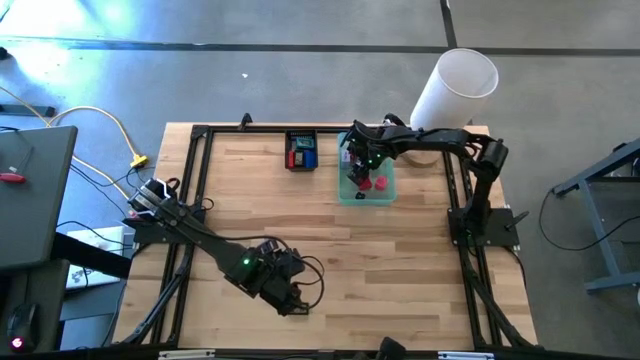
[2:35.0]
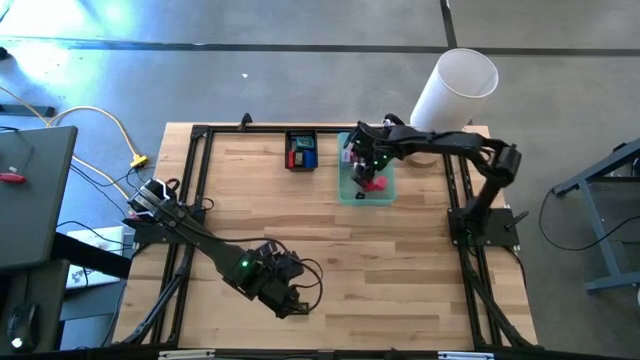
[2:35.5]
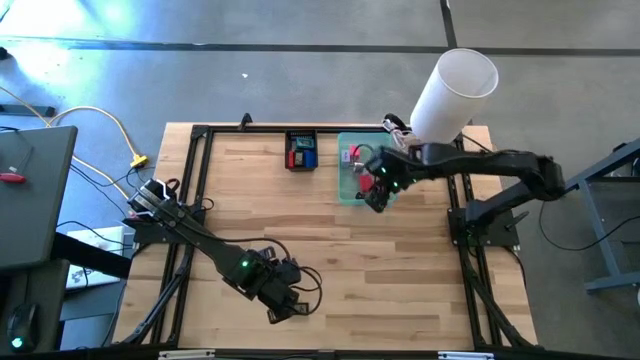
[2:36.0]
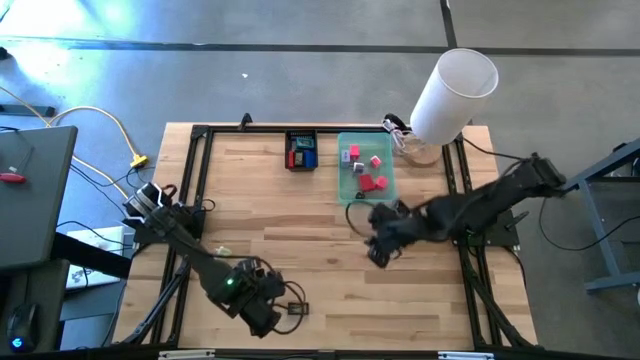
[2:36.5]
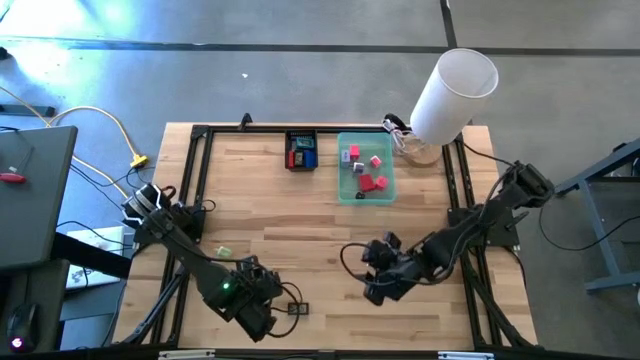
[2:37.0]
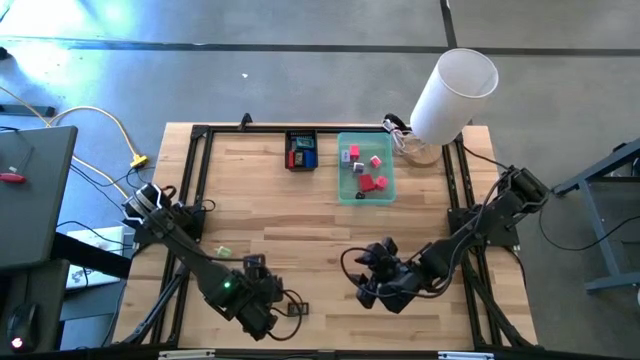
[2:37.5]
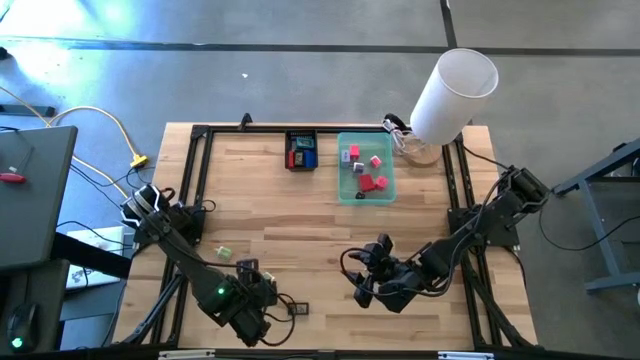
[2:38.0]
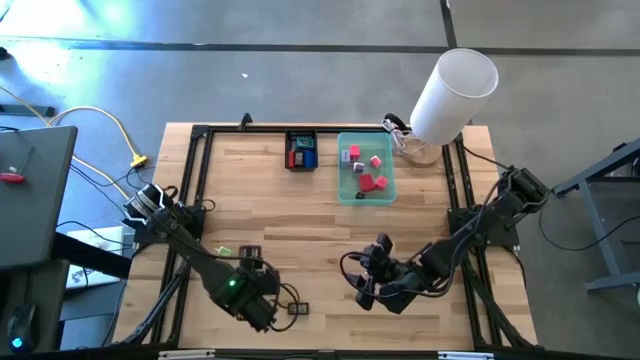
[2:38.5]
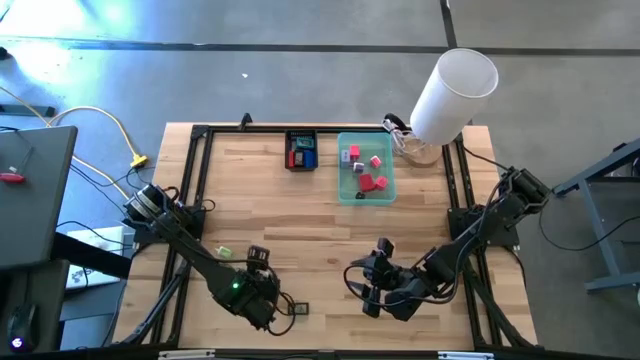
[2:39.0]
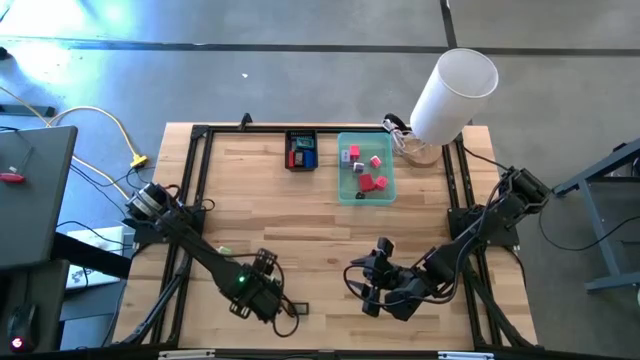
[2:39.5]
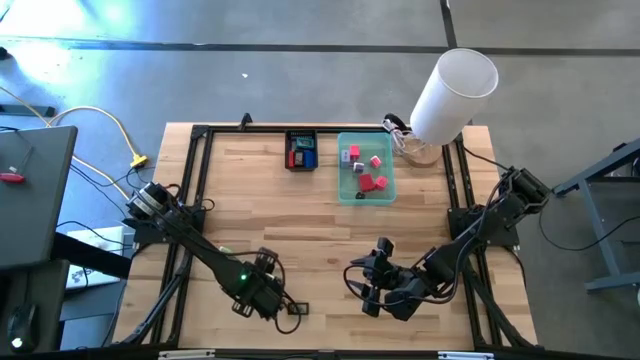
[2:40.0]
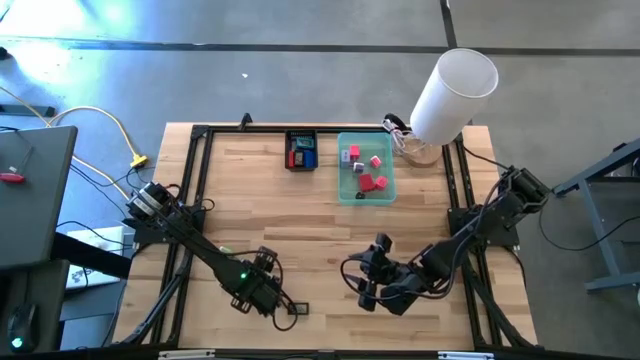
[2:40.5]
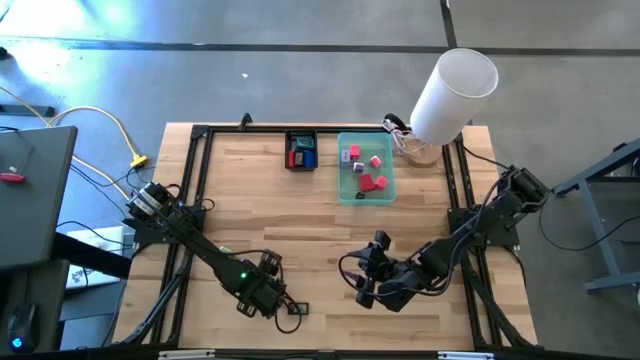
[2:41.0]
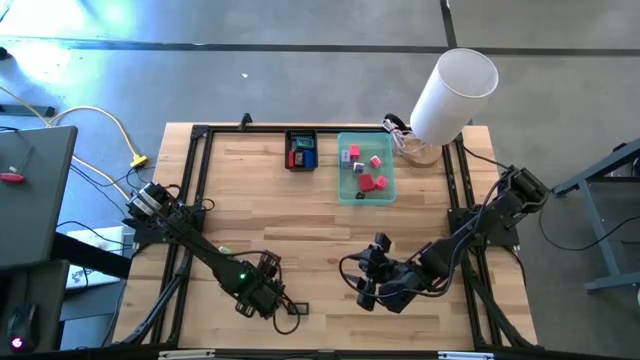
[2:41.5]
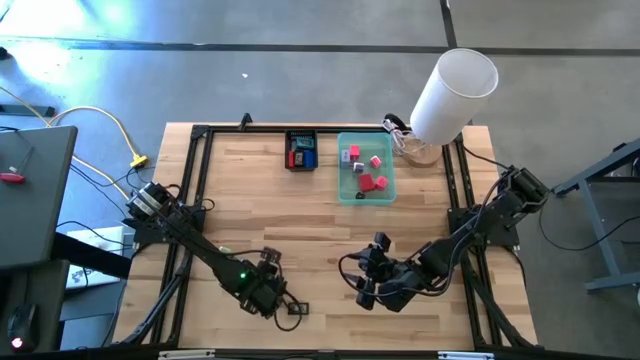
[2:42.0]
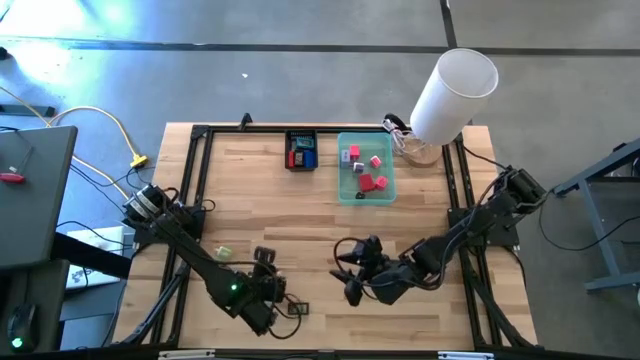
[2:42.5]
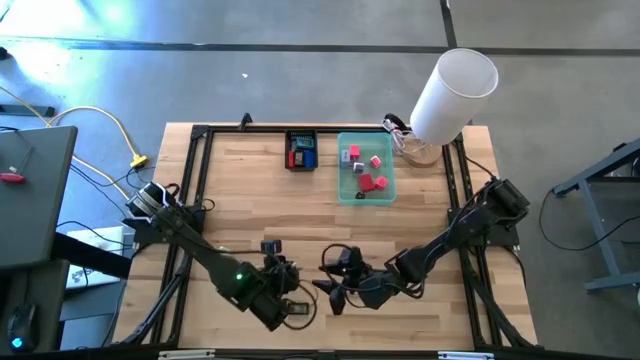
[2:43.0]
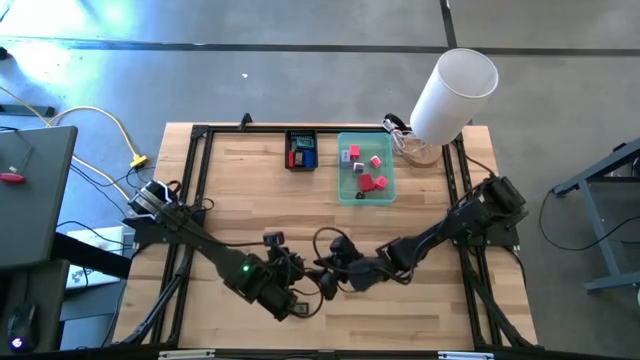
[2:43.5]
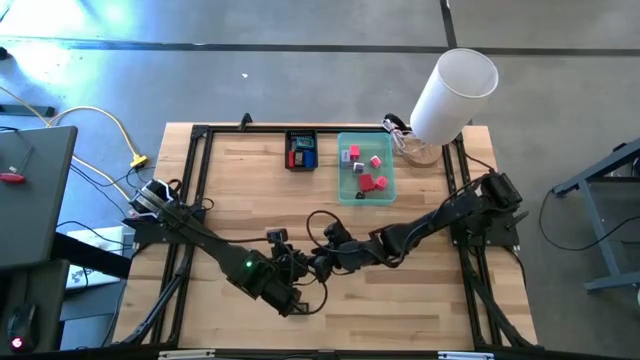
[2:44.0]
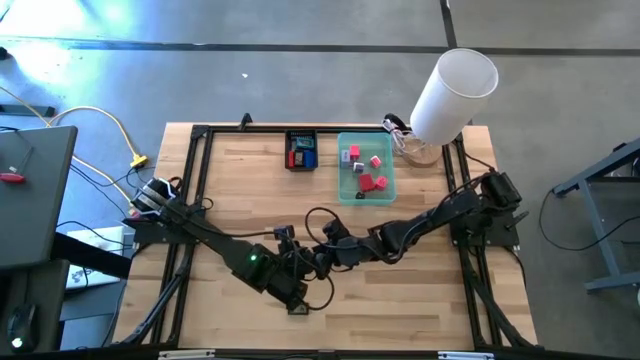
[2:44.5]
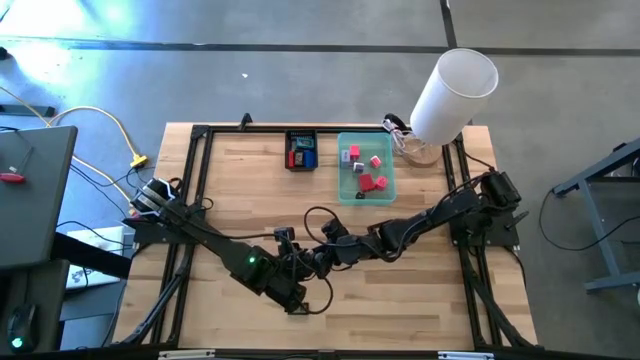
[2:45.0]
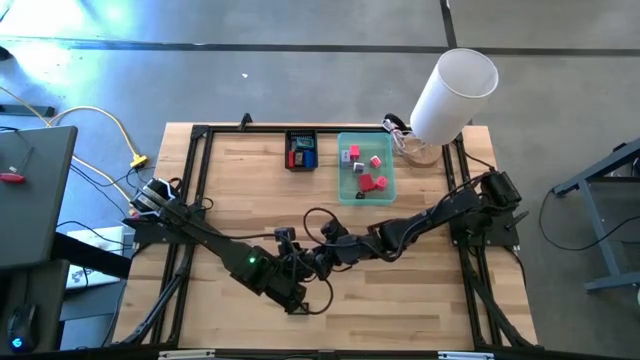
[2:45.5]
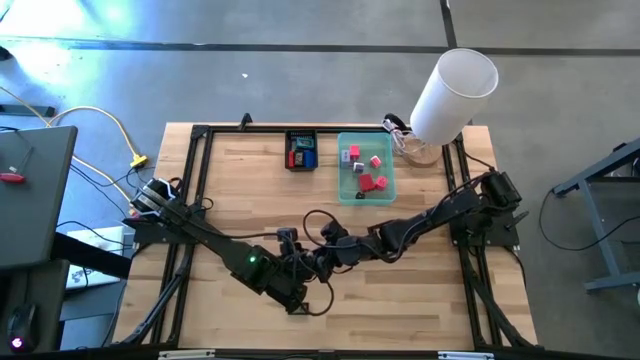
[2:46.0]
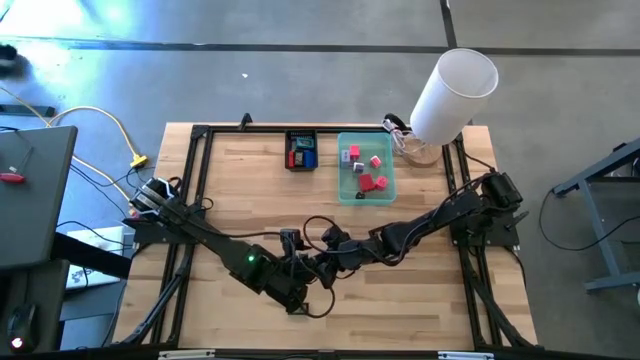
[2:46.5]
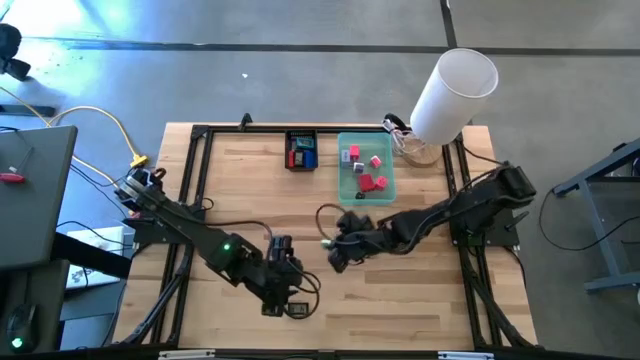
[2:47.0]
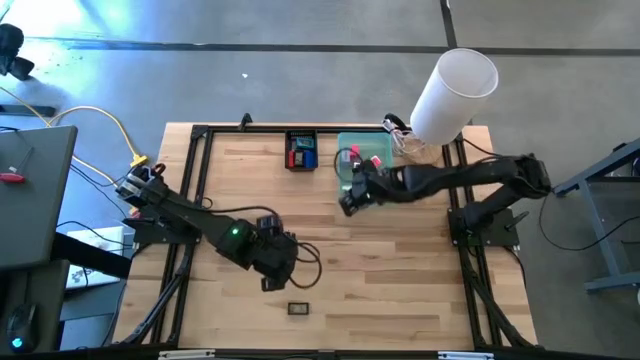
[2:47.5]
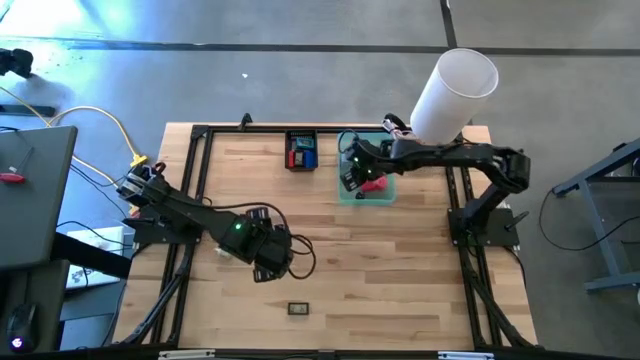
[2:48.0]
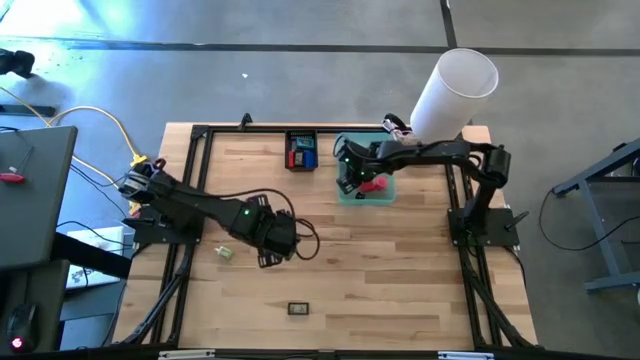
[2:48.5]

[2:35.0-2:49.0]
Task: Pick & Place Office items
Put the bottom green charger adapter into the blue bin

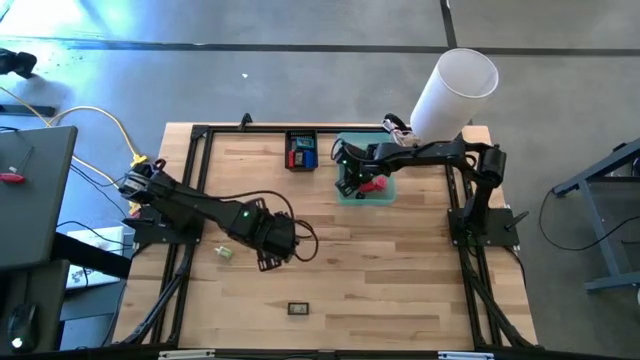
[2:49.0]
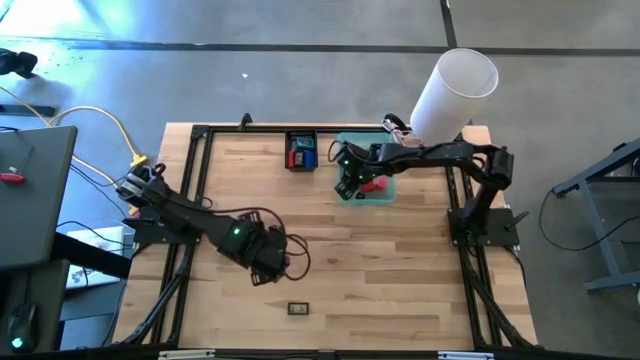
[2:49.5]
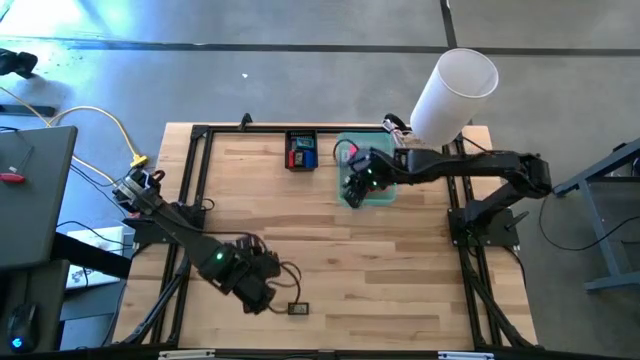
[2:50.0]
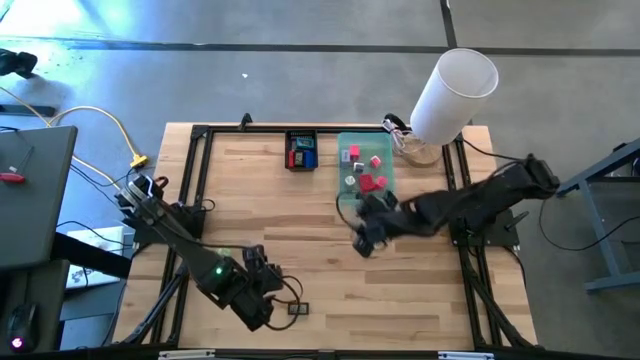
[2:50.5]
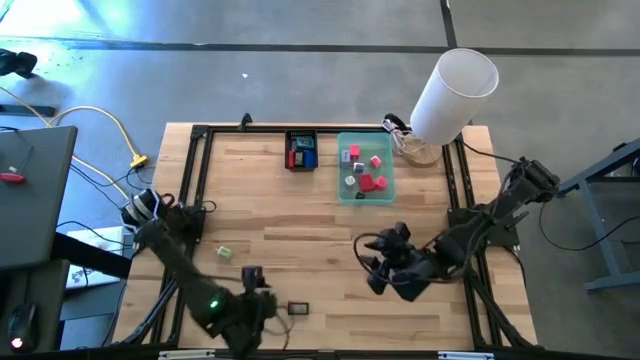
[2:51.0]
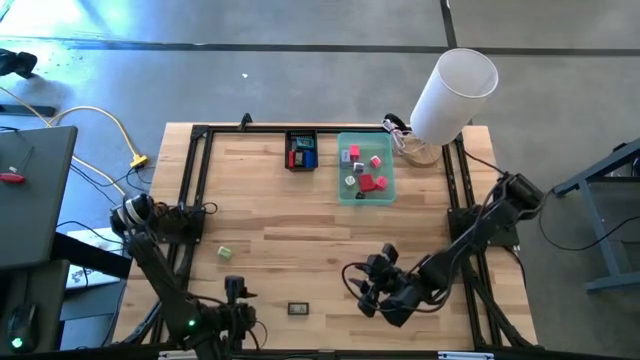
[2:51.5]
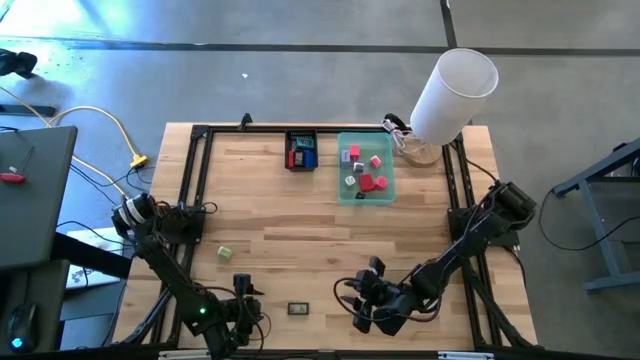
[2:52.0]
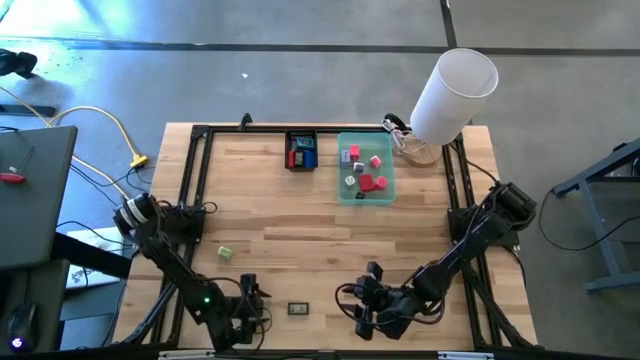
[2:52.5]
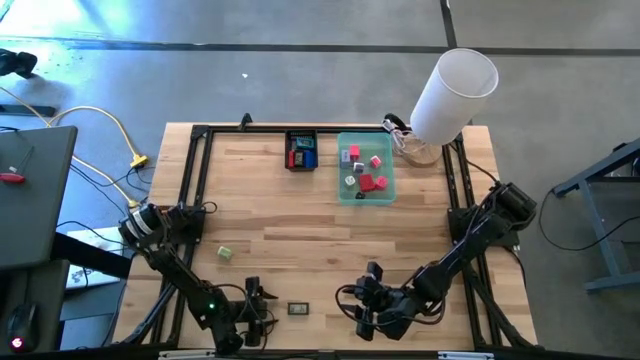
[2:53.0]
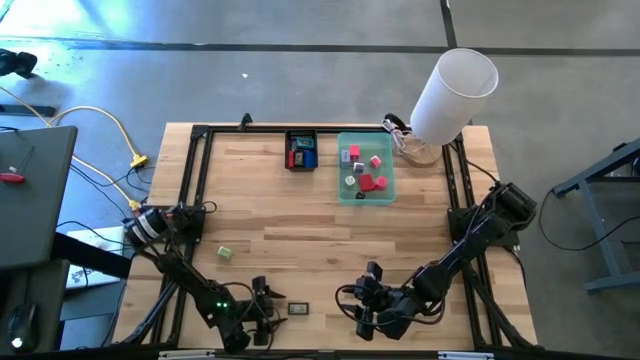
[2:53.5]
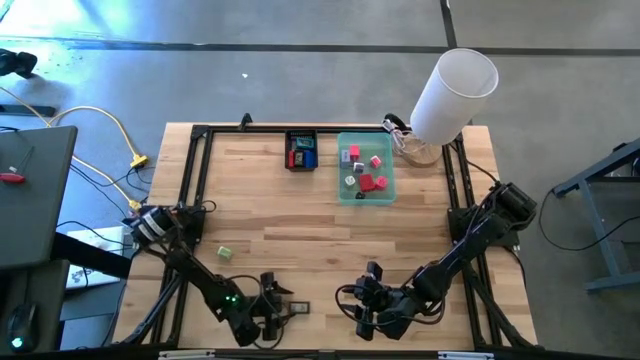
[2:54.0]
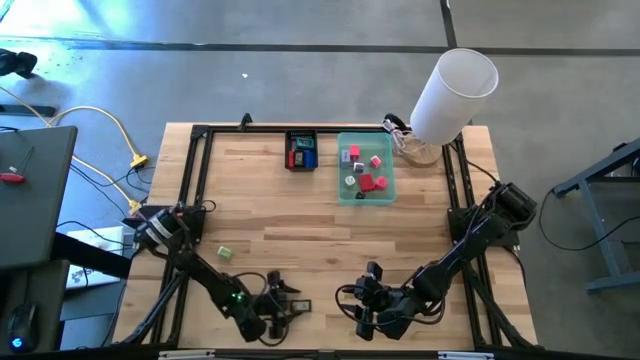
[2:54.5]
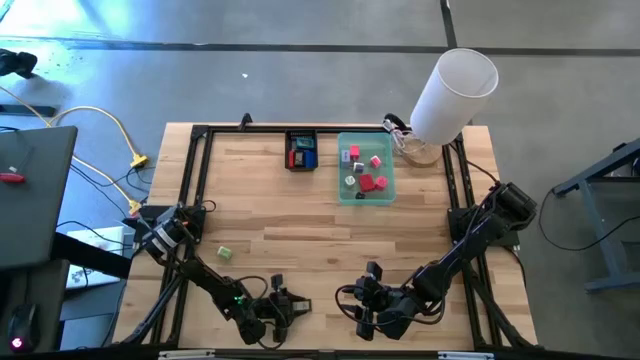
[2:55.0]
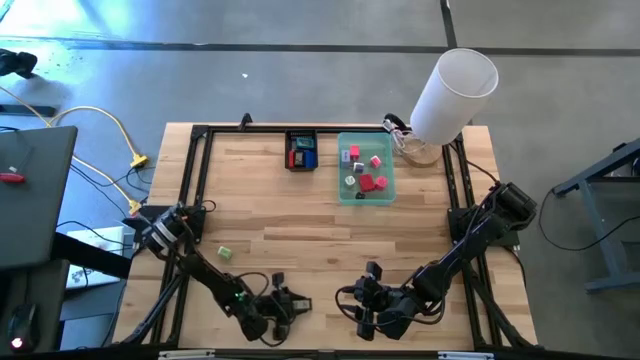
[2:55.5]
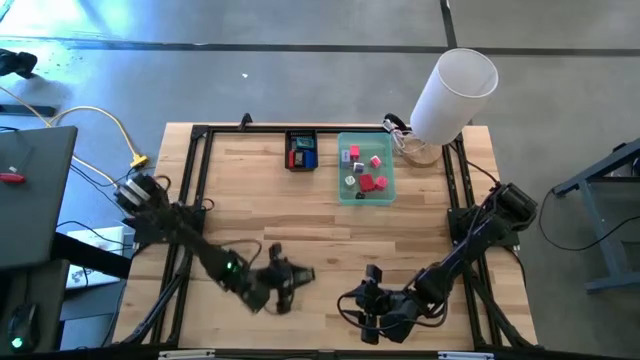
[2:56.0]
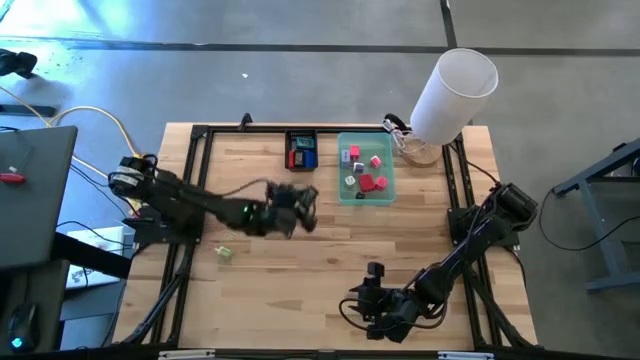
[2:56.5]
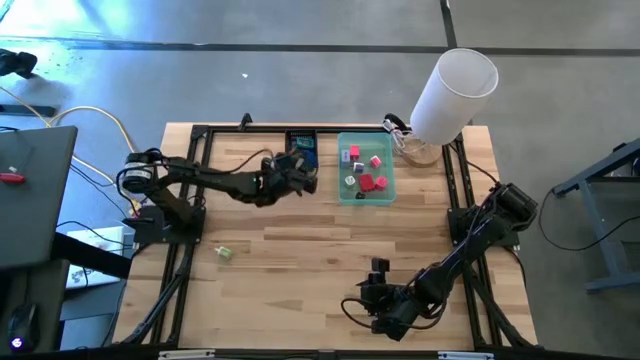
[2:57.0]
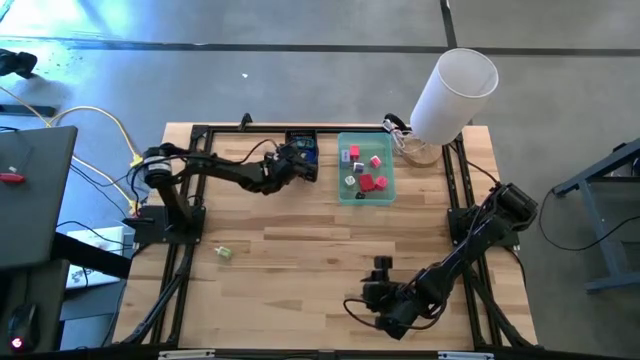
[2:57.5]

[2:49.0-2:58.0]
Put the black digital timer into the black bin
